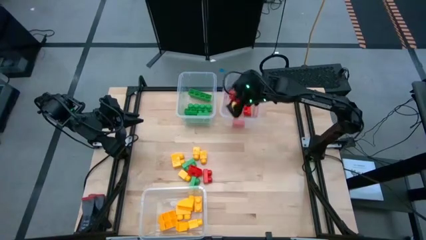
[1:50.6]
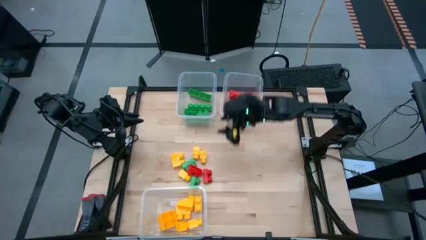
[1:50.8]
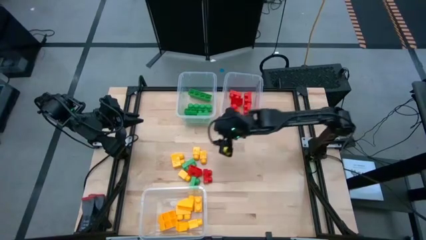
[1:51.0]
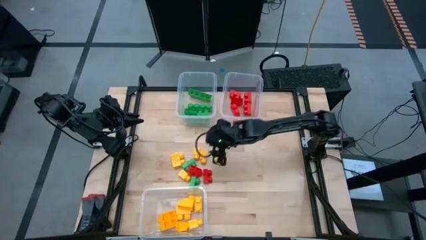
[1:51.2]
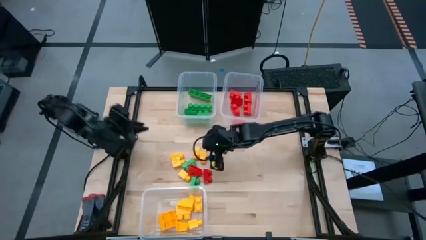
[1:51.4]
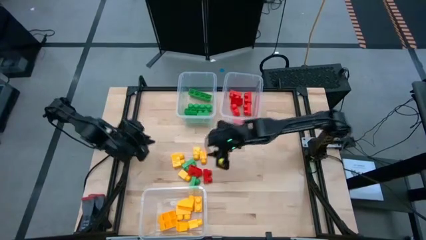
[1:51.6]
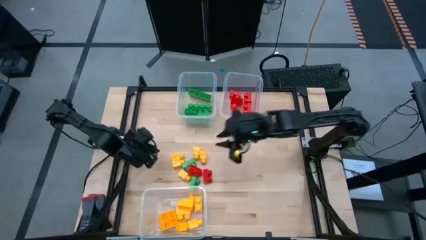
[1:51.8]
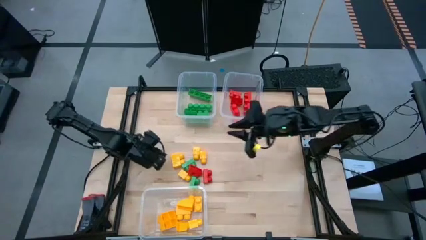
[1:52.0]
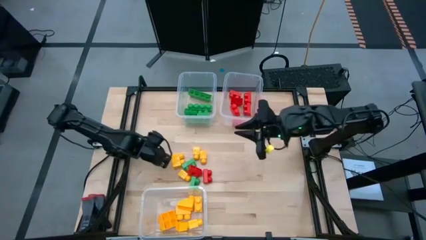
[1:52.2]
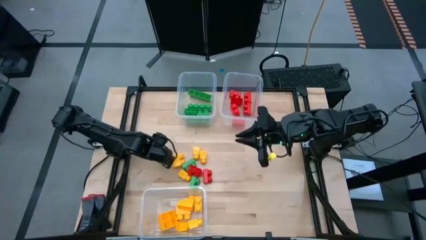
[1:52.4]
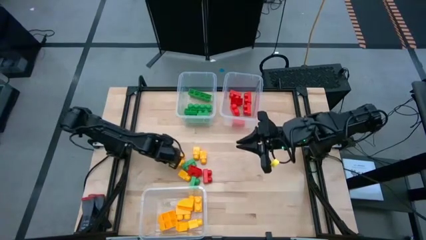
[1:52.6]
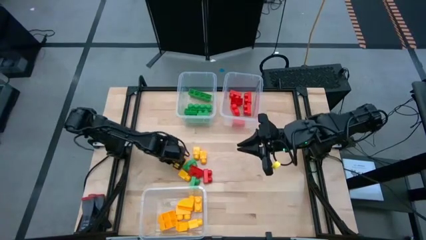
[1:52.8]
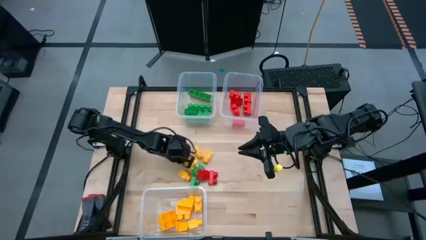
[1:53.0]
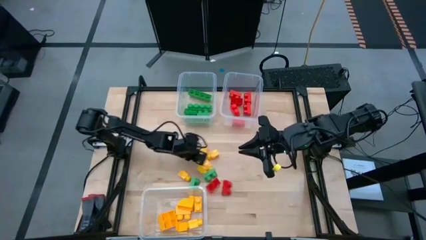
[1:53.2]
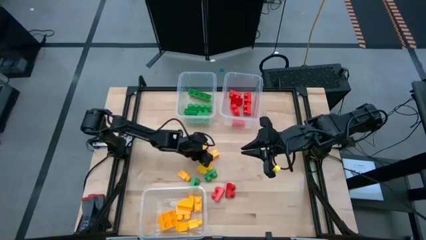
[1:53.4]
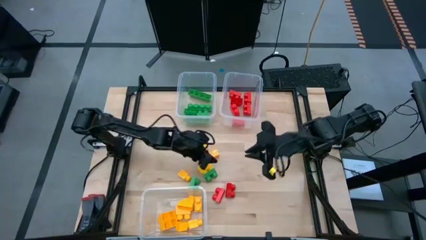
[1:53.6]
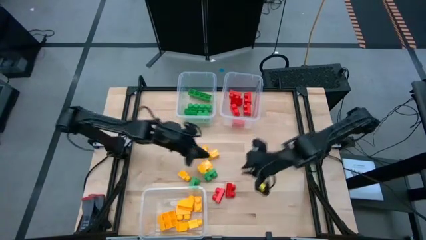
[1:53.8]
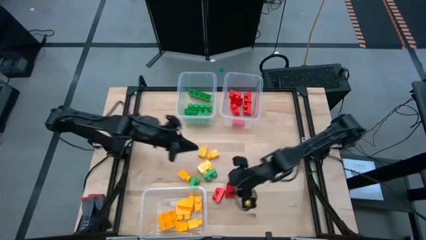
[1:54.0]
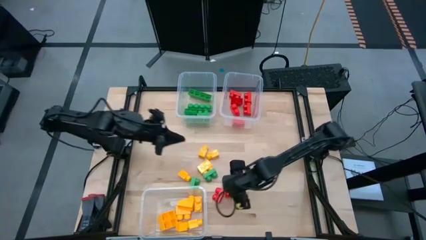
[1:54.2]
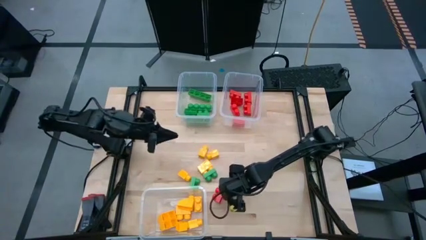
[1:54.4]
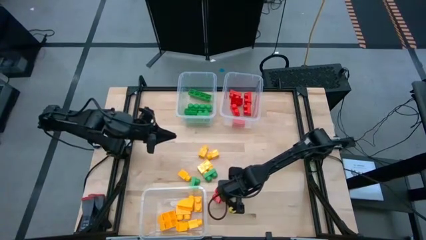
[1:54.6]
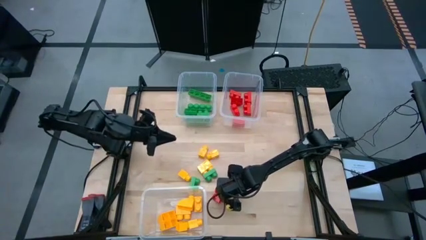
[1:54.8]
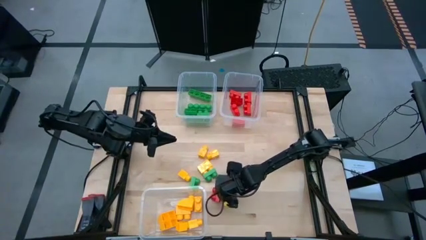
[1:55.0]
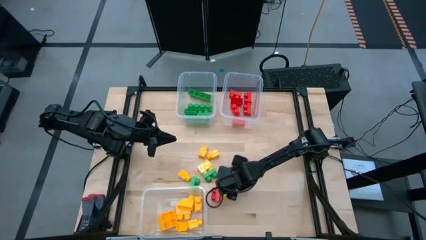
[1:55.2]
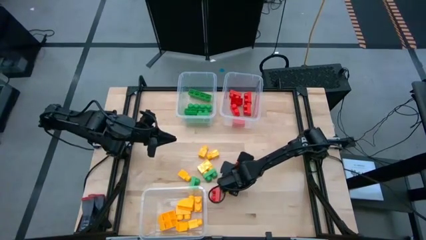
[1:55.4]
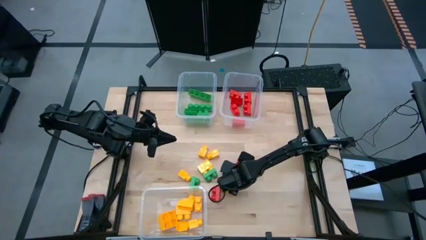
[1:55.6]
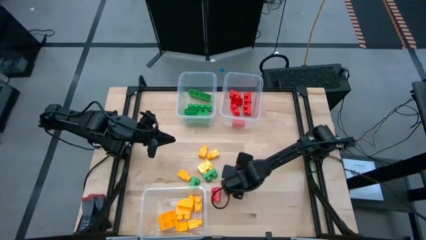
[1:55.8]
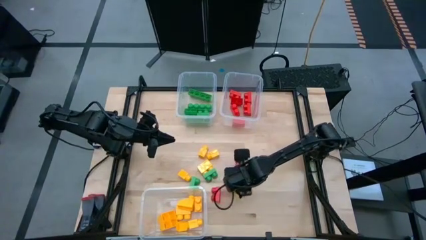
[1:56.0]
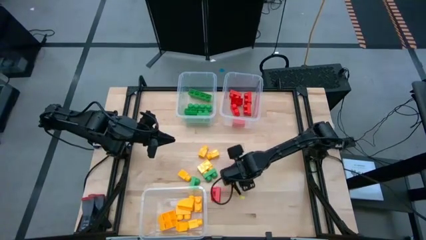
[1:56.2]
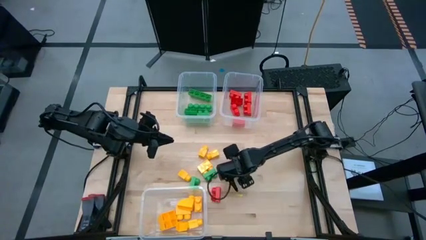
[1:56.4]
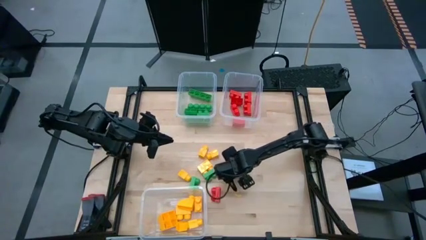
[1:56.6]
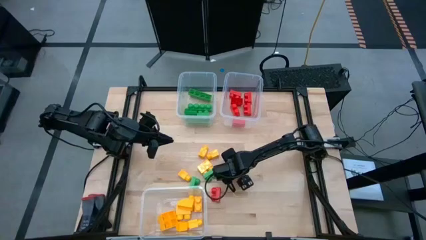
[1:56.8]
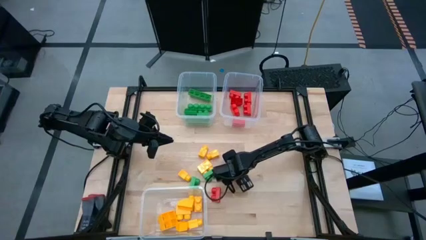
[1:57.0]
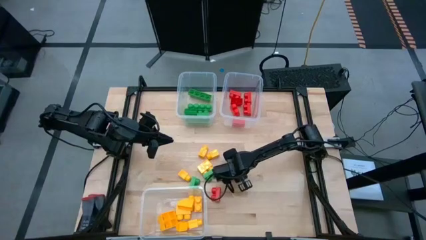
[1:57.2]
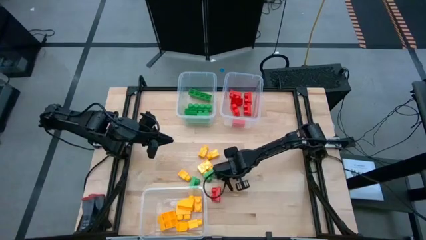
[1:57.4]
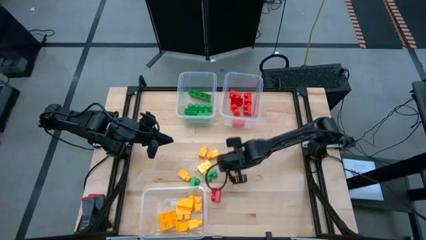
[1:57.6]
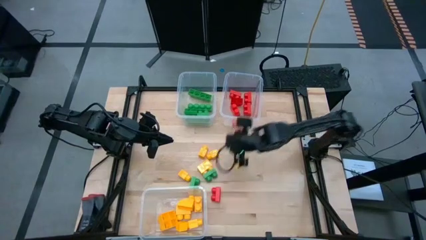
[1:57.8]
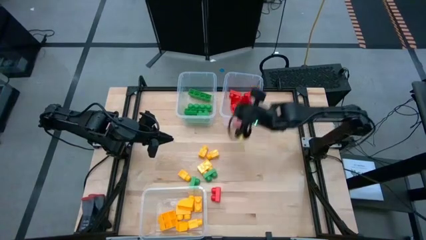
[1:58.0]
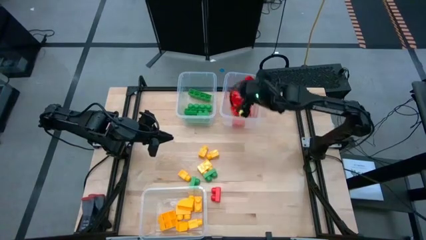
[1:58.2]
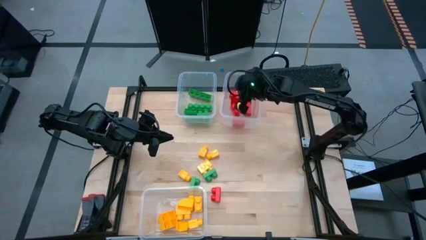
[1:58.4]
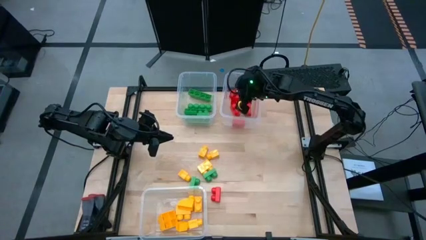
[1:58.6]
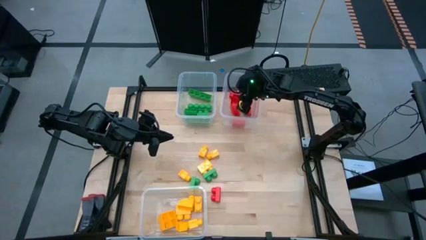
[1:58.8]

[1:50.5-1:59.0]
Task: Sort blocks
Put the red game piece into the top right transparent bin

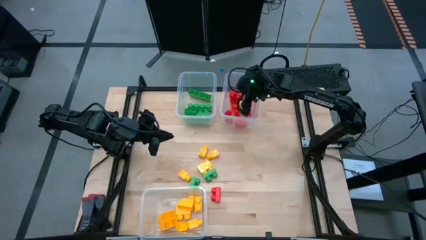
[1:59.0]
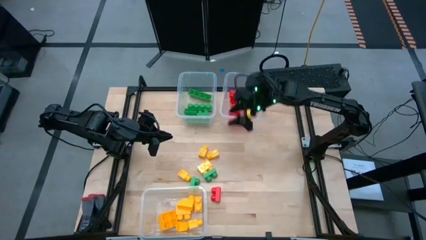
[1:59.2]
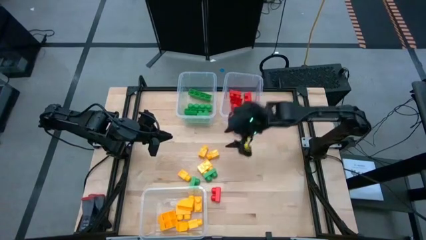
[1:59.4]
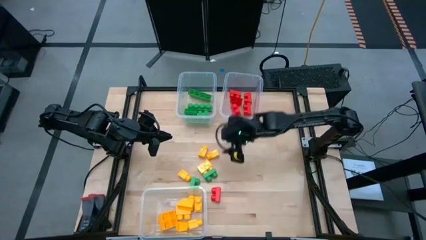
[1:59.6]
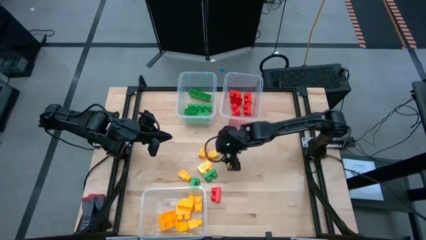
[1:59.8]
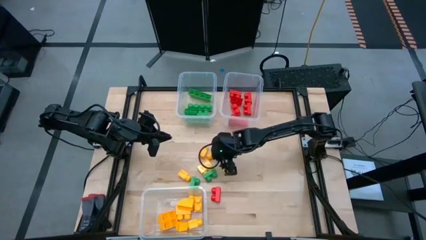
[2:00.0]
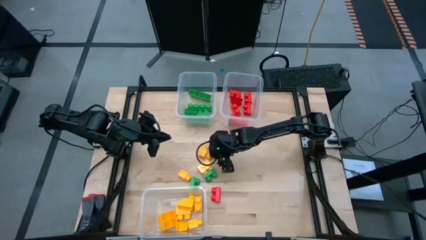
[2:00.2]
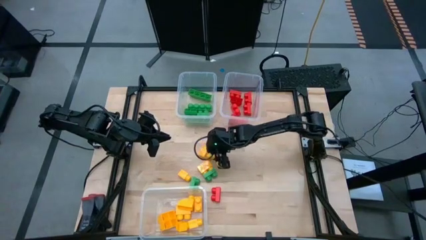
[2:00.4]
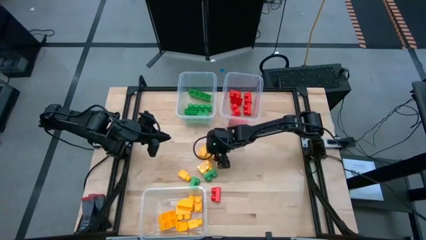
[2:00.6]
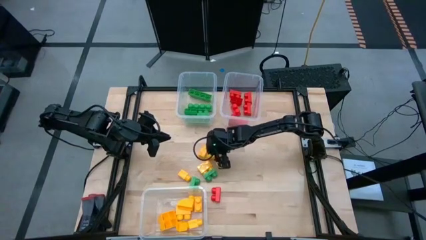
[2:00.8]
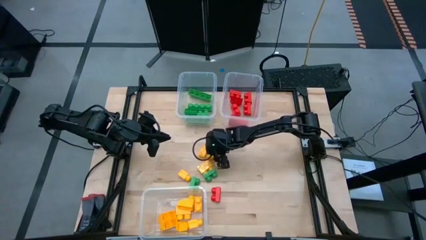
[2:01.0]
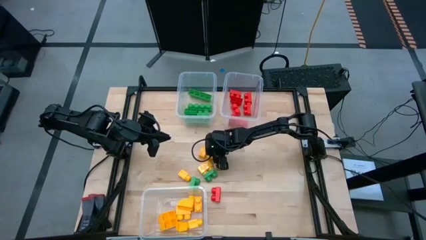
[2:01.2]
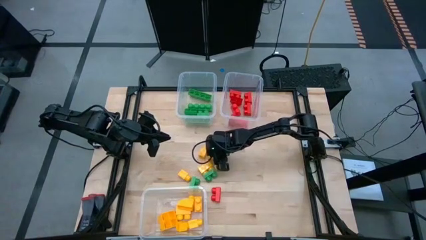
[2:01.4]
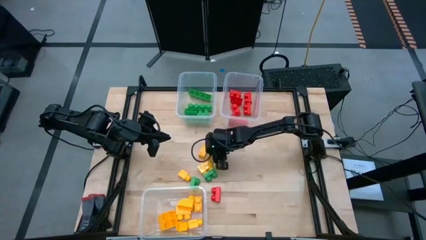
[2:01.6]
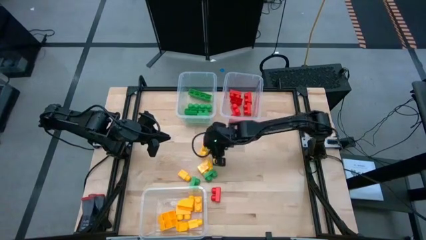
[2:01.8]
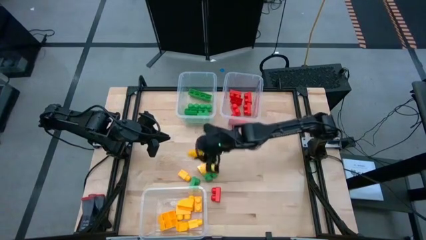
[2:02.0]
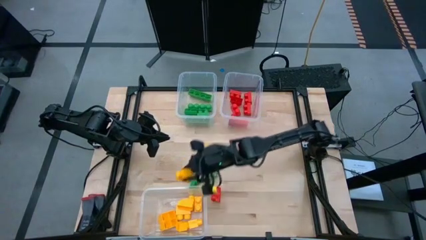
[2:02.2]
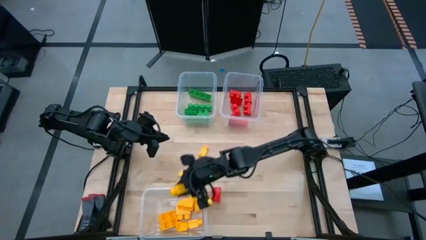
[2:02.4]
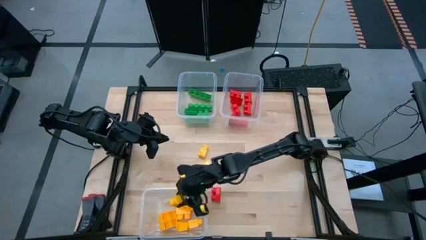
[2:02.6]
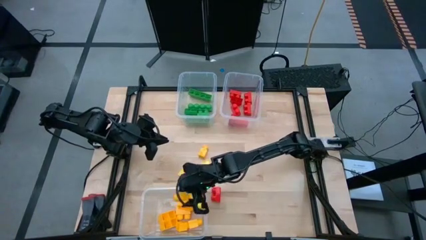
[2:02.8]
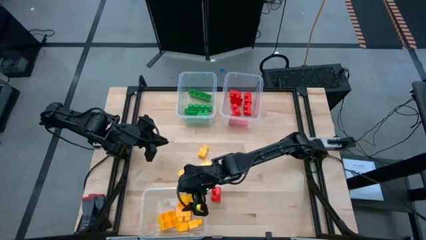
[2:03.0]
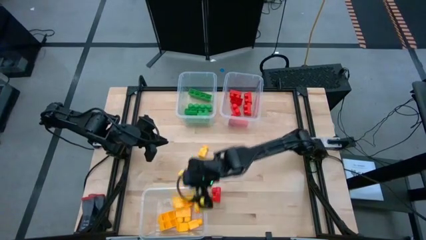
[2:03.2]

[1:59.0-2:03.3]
Put the yellow game piece into the bottom transparent bin

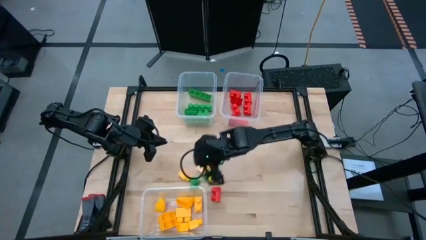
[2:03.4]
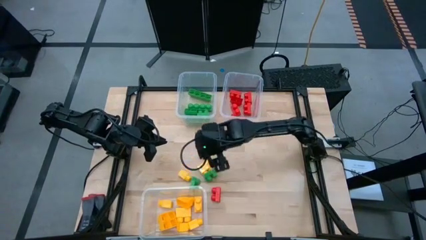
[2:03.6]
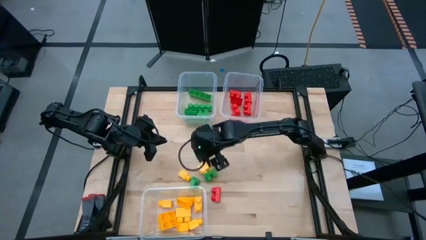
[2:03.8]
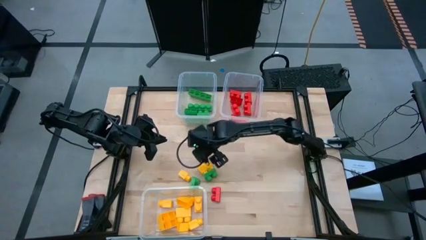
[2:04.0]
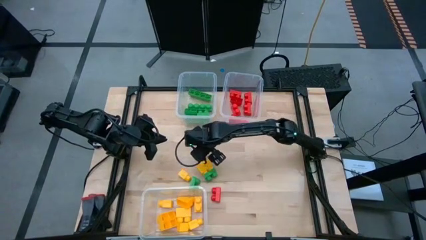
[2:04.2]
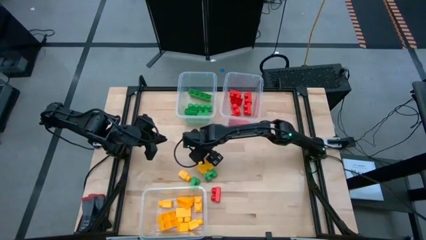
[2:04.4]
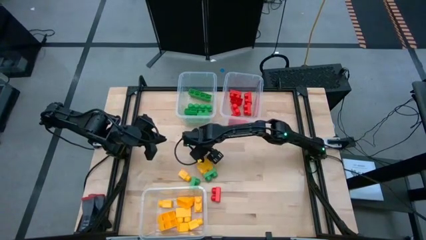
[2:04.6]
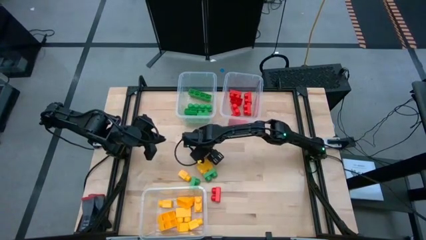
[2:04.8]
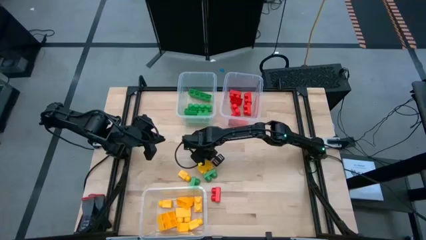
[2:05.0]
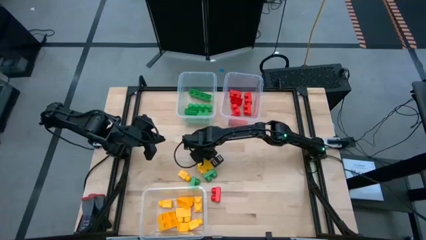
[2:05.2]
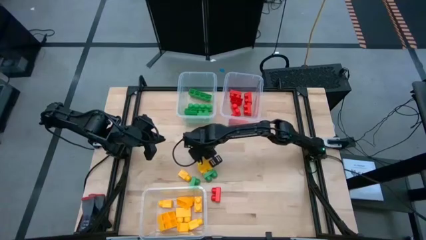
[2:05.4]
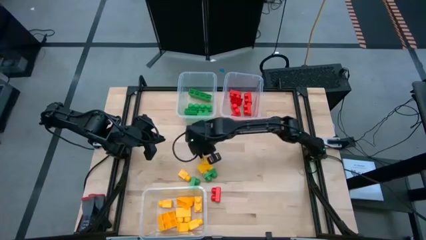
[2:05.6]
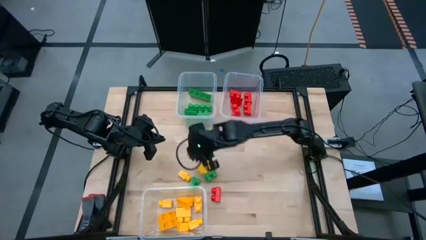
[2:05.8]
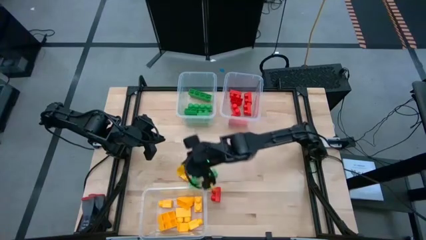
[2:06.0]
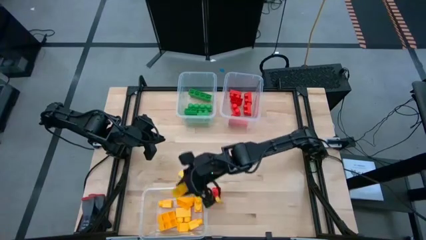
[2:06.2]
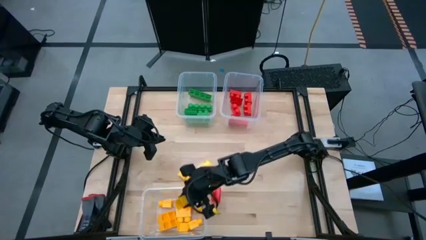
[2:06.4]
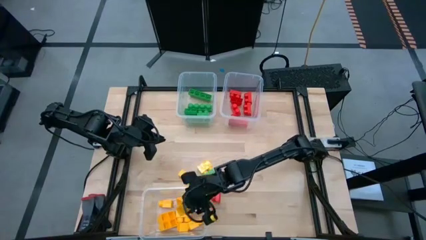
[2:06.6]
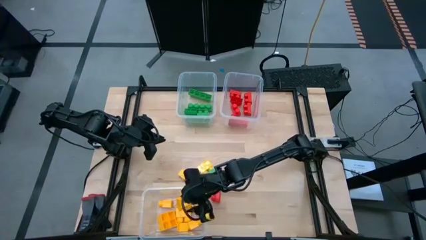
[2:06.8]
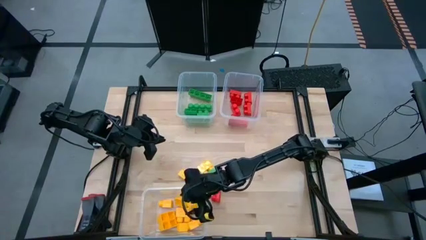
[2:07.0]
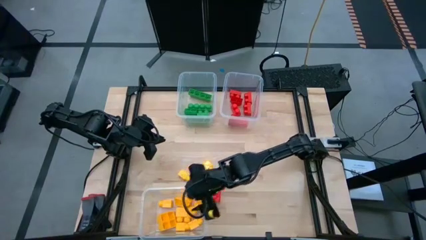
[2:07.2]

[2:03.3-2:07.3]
Put the yellow game piece into the bottom transparent bin

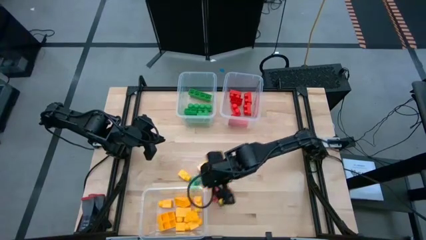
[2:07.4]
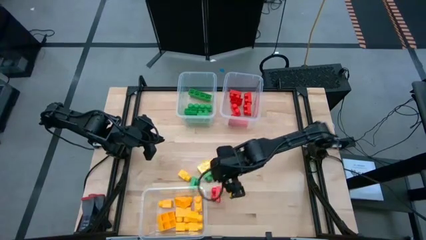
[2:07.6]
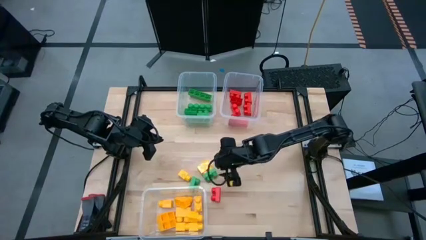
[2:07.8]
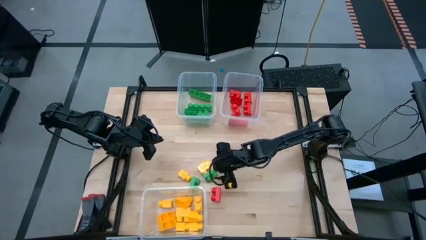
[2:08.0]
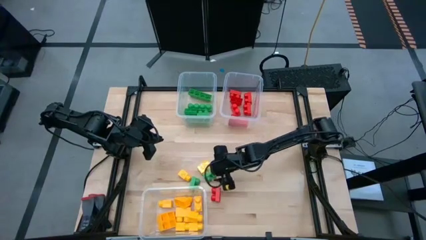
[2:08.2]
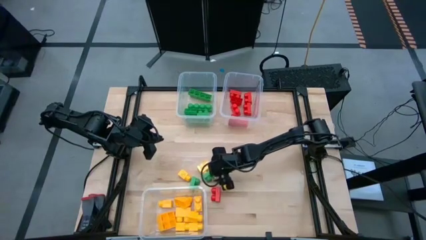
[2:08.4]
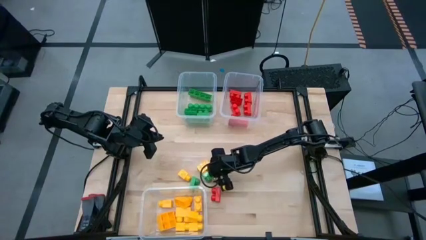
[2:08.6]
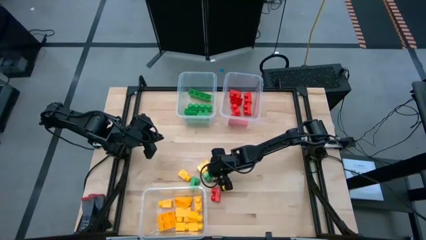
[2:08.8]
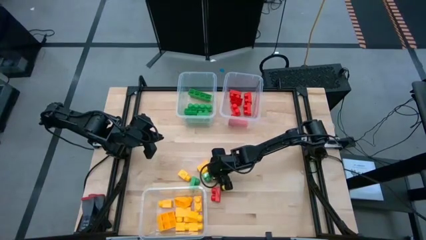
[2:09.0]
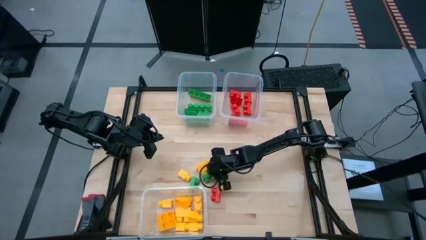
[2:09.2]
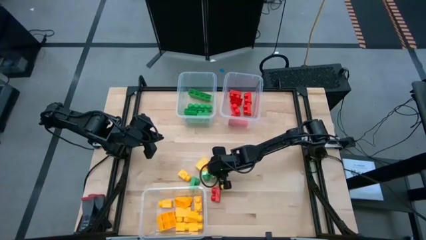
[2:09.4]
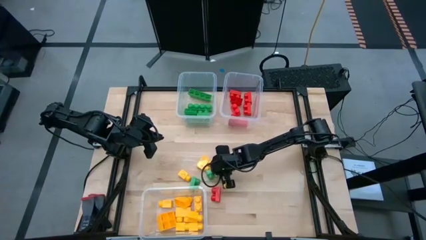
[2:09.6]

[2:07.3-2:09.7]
Put the green game piece into the top left transparent bin
